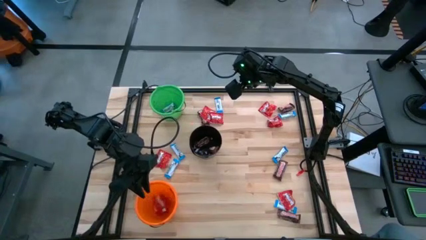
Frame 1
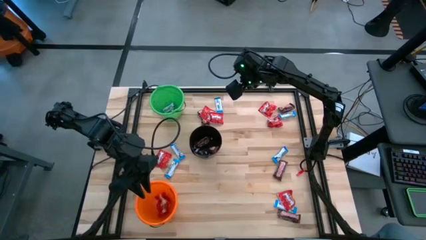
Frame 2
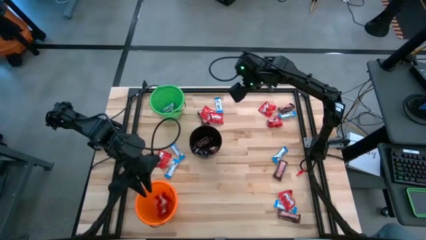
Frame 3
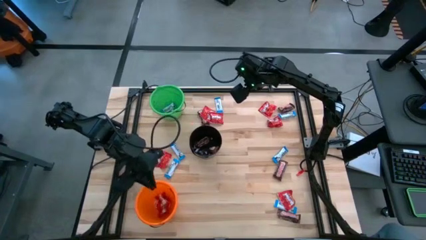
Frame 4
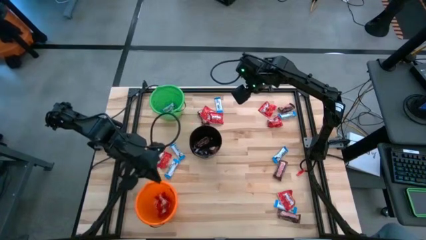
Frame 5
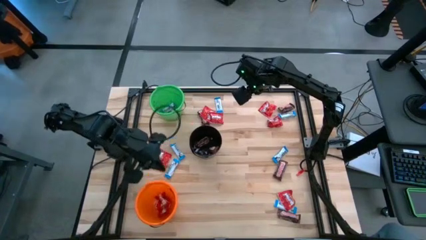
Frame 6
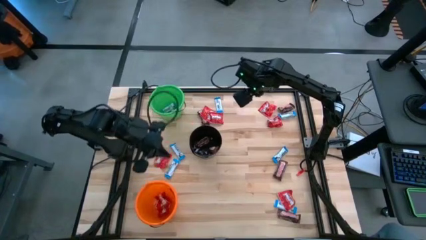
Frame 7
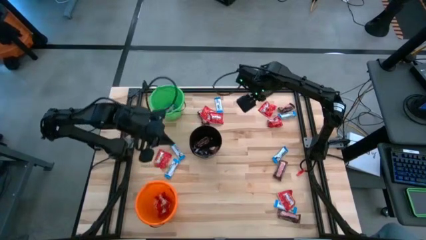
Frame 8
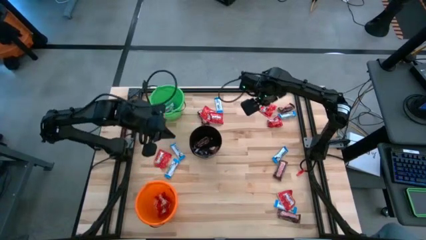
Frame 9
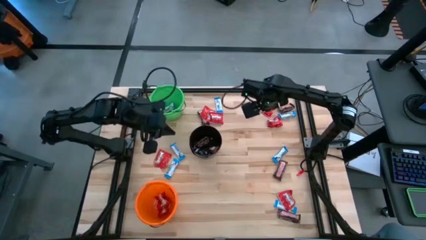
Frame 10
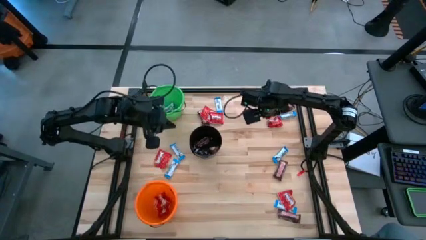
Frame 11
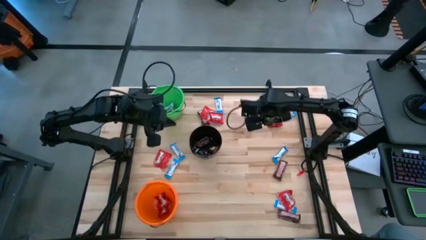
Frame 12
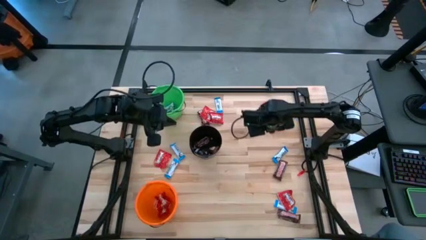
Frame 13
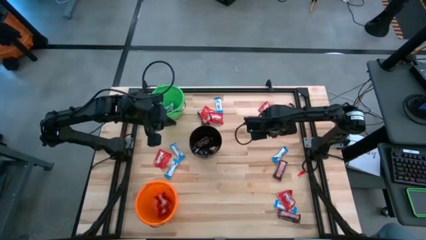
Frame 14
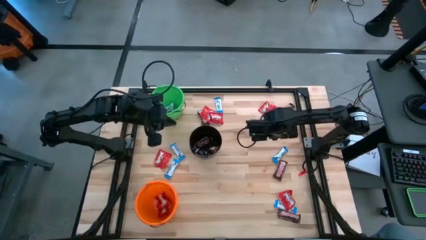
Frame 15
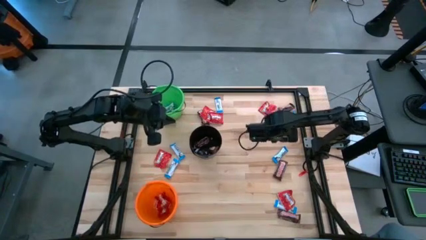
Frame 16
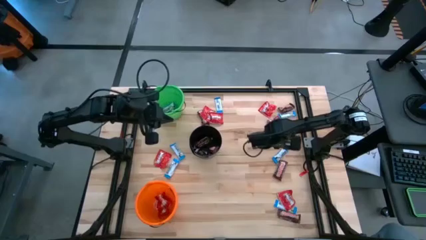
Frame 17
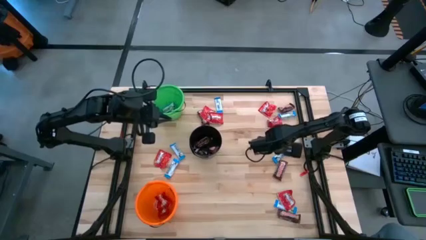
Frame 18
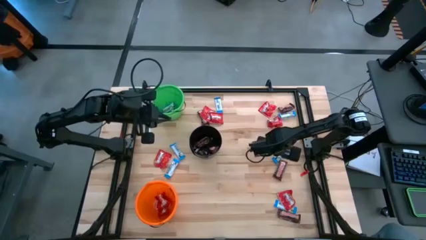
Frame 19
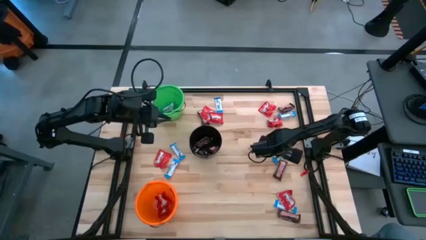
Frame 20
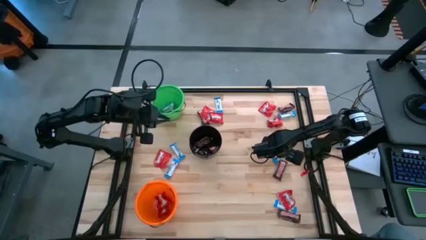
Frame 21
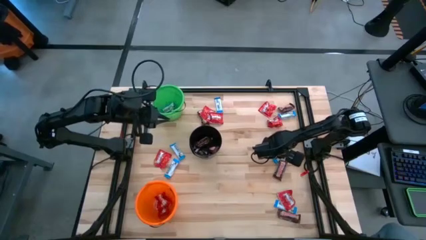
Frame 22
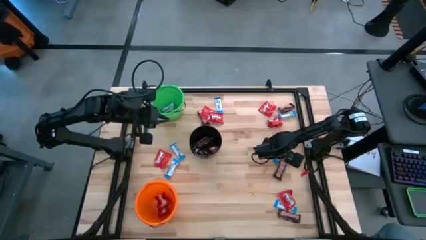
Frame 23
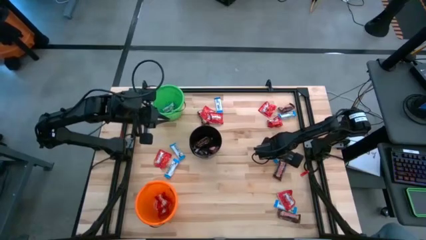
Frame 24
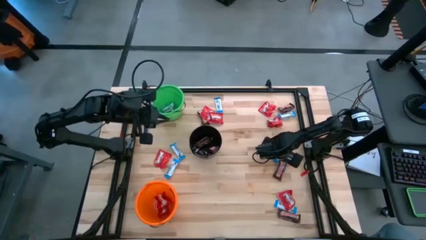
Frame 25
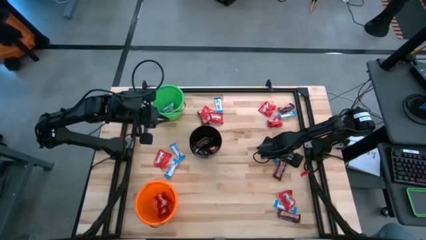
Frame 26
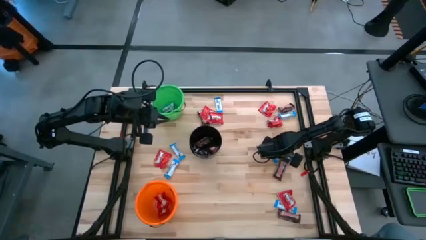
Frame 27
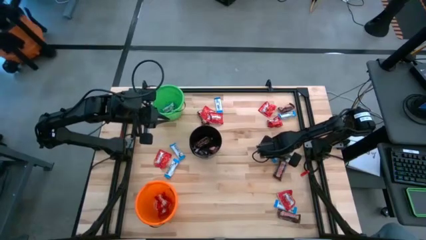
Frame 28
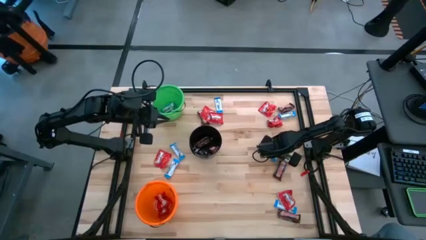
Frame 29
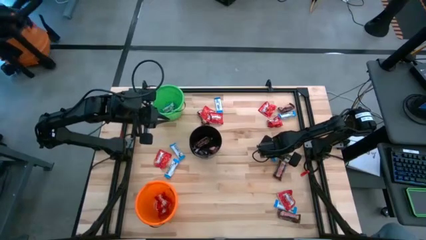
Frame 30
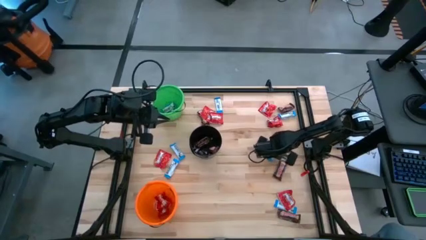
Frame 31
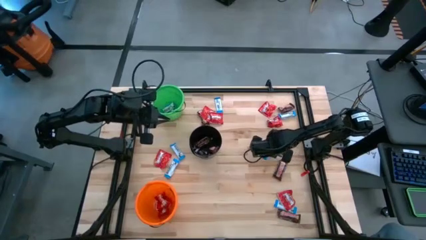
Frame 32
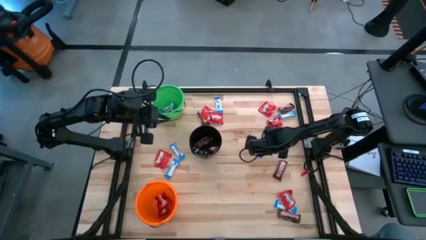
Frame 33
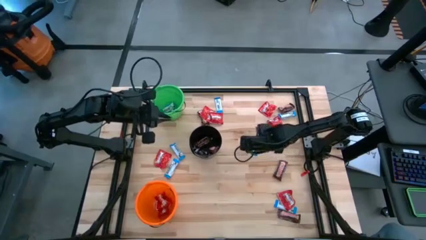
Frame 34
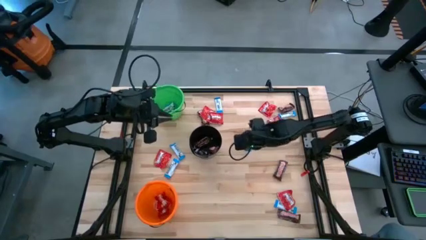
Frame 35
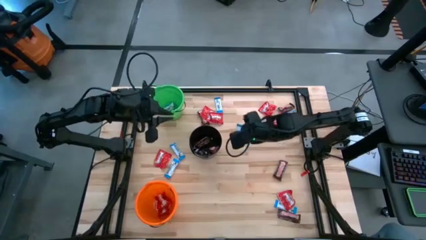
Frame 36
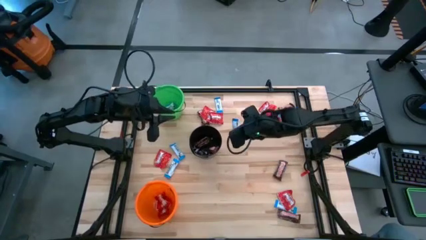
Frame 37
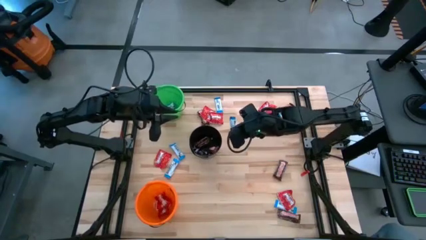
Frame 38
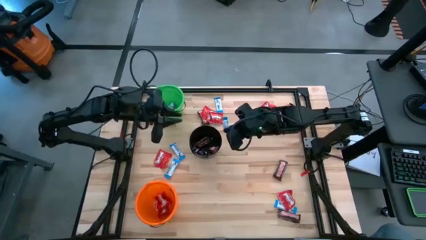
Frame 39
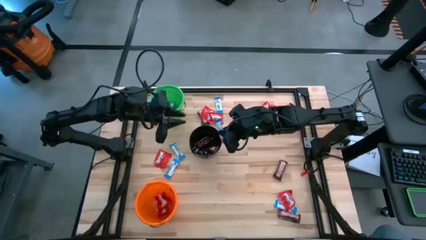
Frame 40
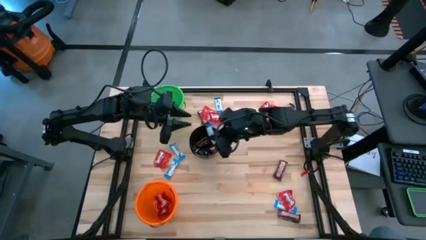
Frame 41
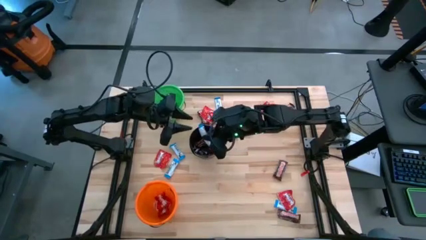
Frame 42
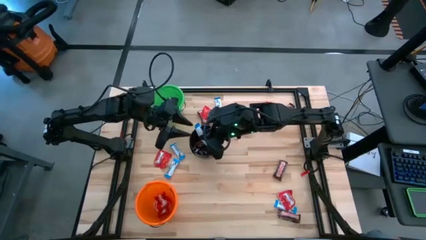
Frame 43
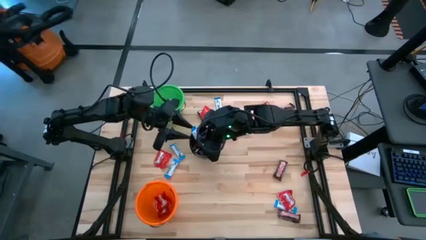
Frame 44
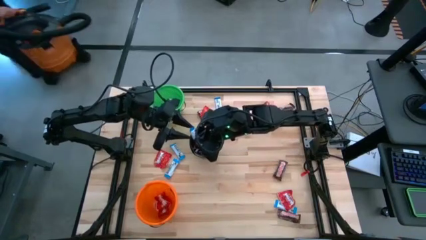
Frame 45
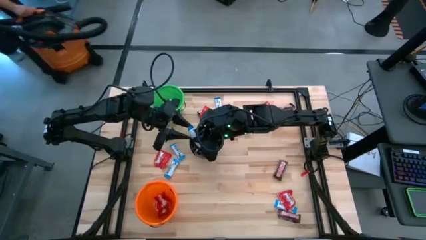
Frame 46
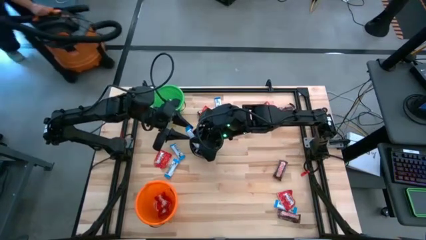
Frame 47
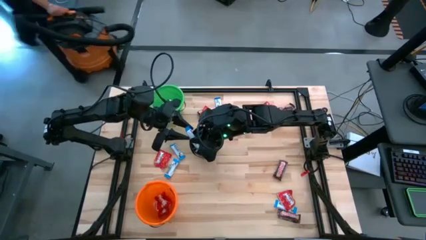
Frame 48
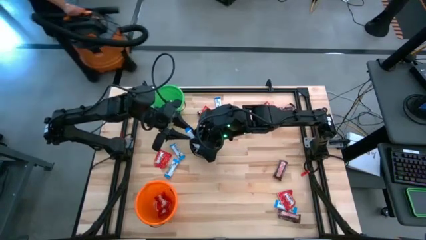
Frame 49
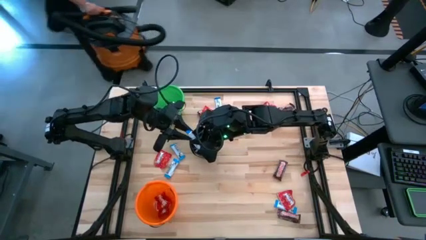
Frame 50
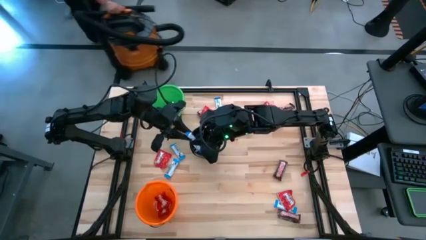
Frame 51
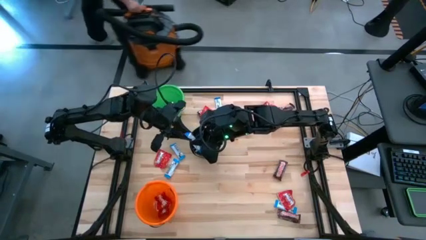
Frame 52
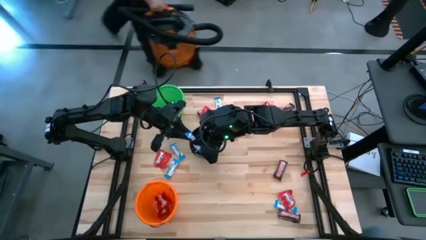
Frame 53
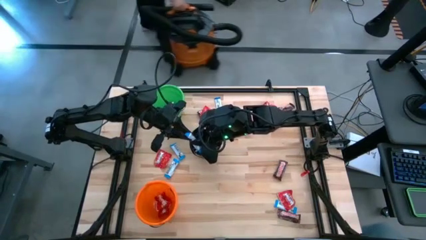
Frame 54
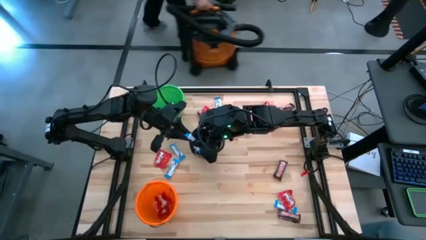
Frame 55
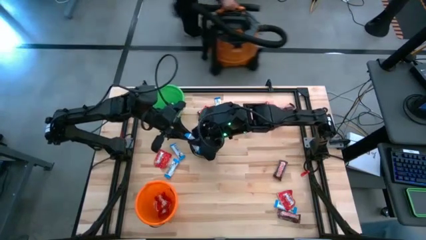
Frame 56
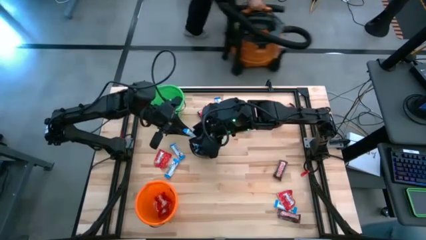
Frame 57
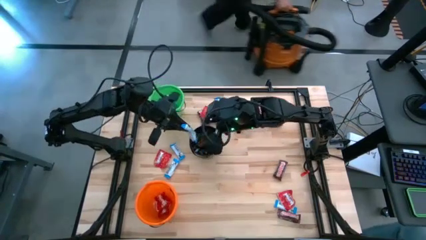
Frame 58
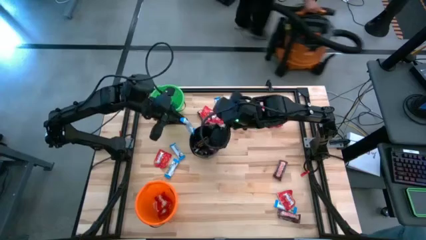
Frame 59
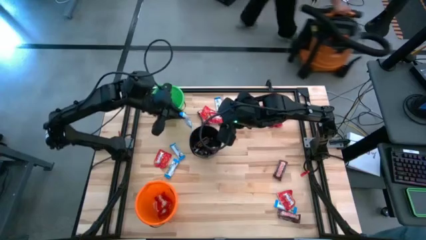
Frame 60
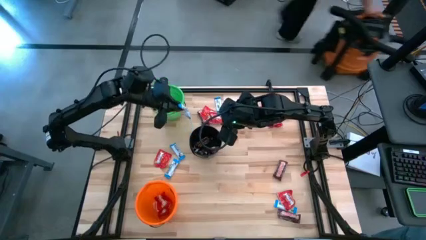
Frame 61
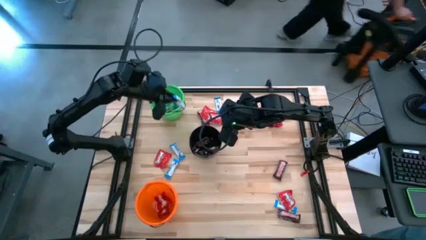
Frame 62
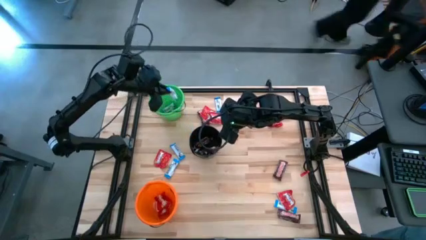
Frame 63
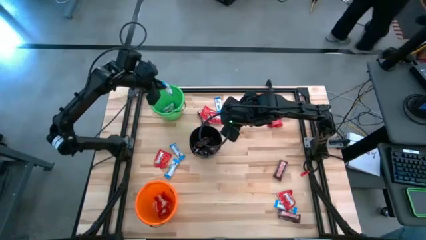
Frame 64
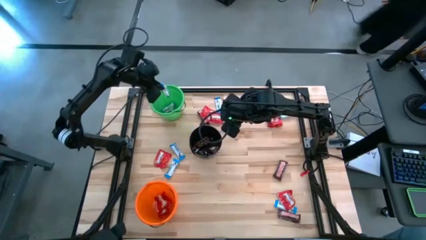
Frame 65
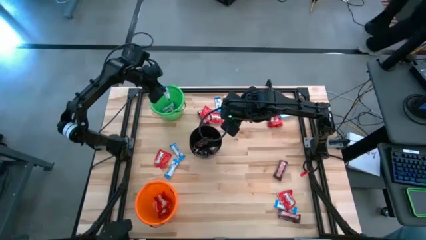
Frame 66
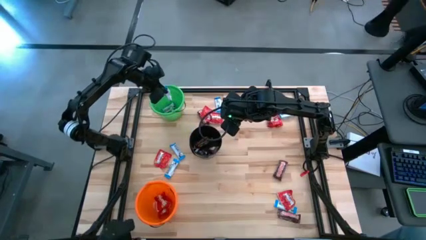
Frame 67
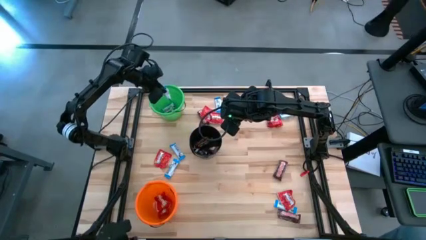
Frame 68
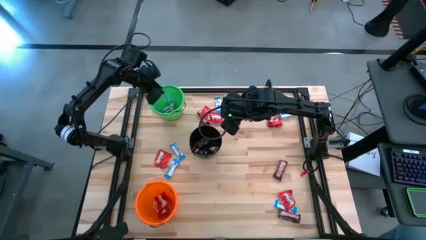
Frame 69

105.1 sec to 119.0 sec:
Task: Sort candy
Put the white chocolate into the green bucket

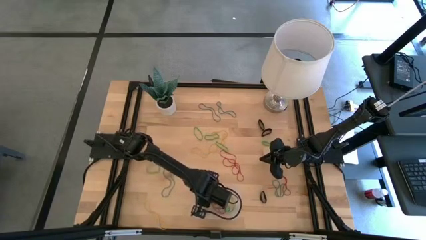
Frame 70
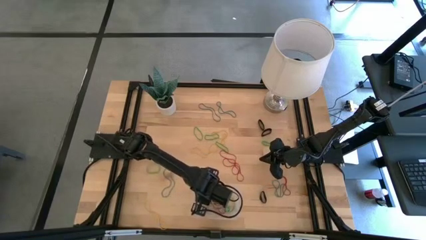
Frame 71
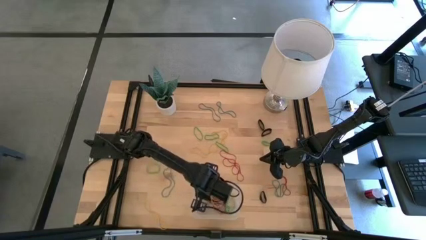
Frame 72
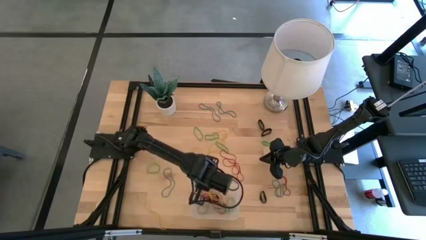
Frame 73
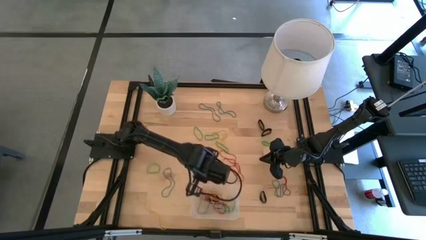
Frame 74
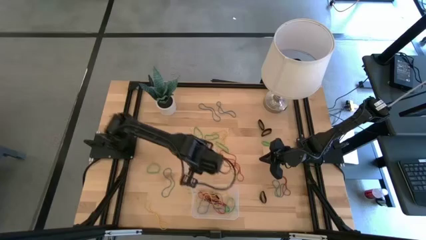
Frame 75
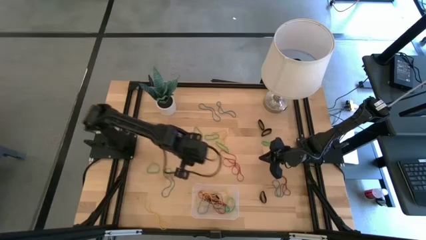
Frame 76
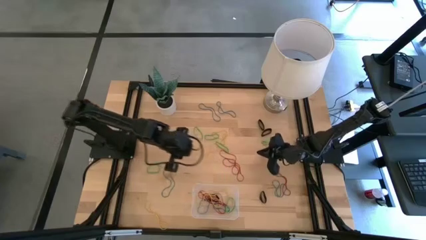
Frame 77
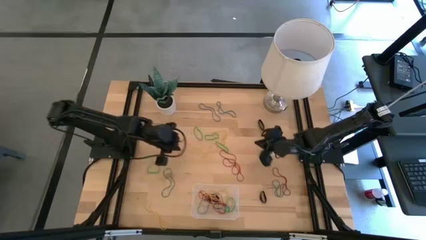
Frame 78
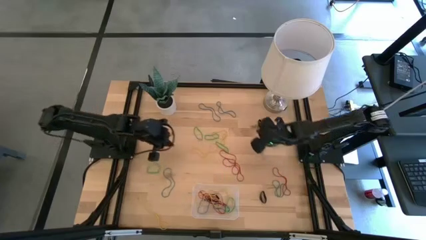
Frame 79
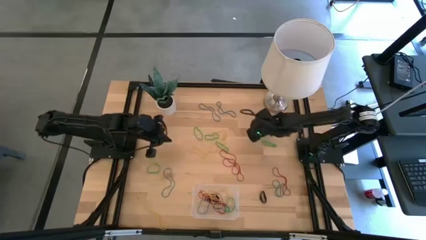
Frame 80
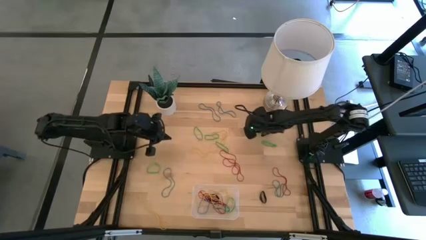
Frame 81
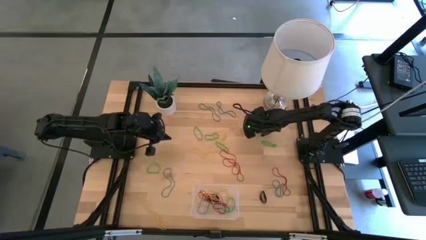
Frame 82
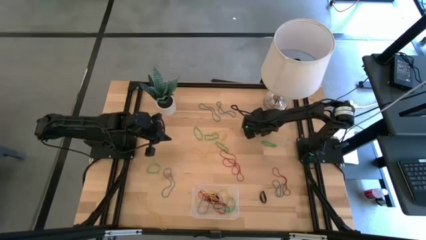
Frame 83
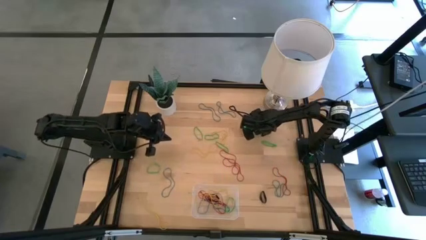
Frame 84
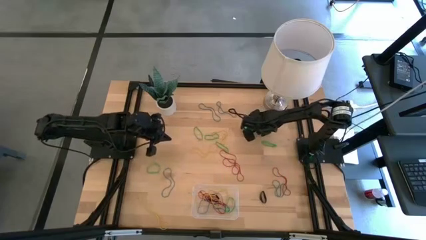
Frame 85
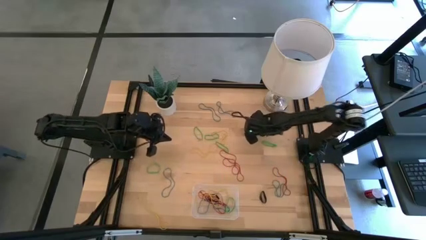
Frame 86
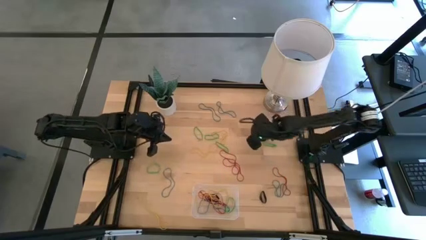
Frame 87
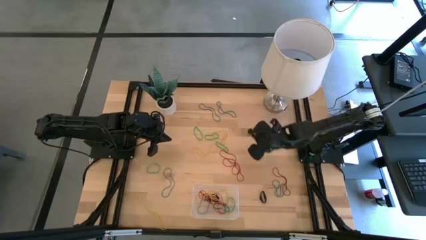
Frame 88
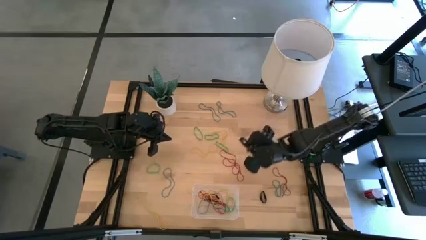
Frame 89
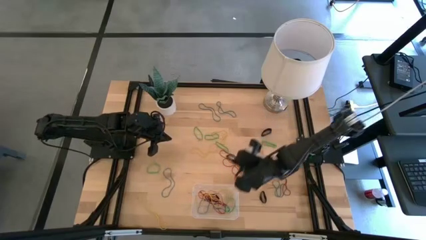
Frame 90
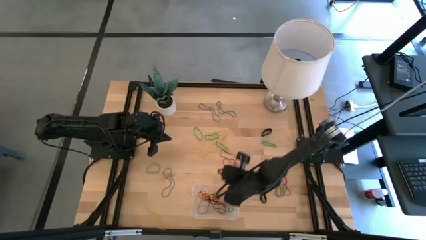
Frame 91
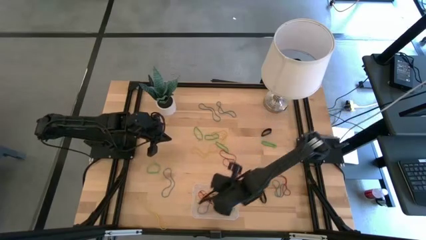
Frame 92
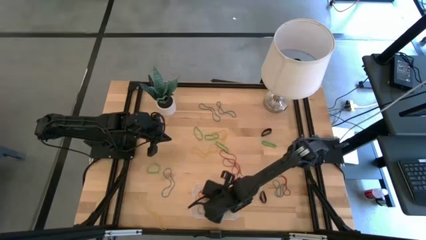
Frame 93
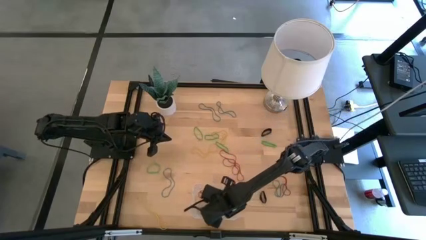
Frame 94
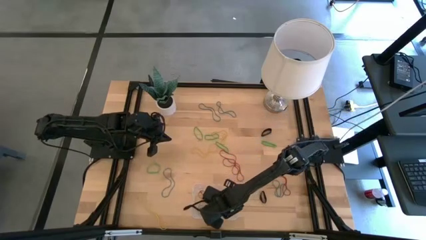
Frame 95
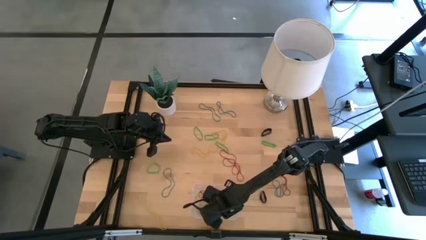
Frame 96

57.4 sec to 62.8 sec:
Task: Pick and place rubber bands into bin
Put the black rubber band into the transparent bin
